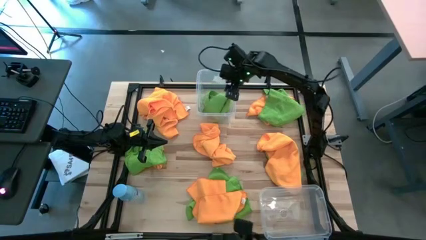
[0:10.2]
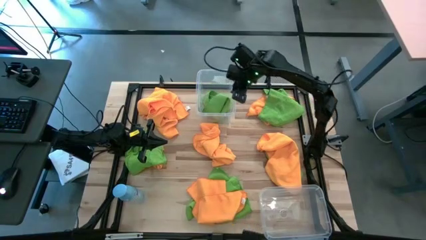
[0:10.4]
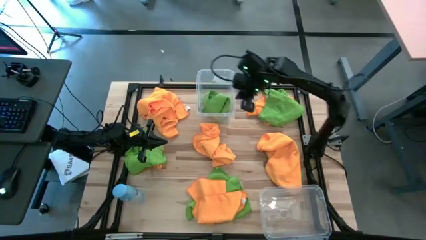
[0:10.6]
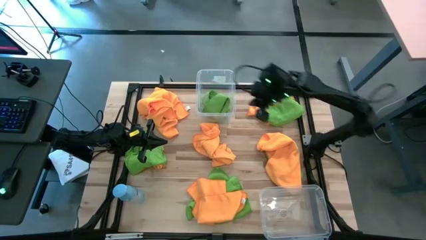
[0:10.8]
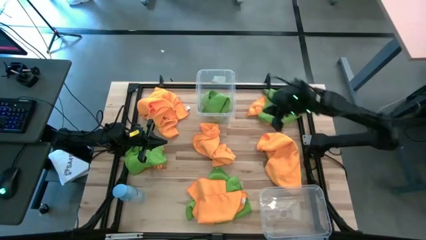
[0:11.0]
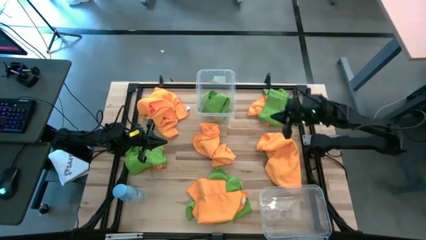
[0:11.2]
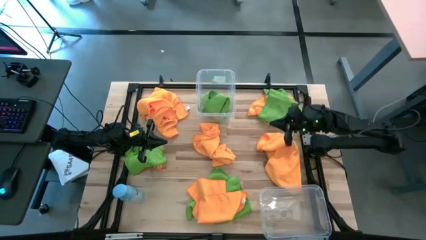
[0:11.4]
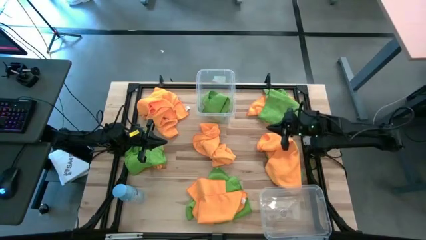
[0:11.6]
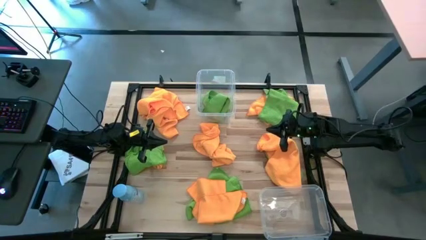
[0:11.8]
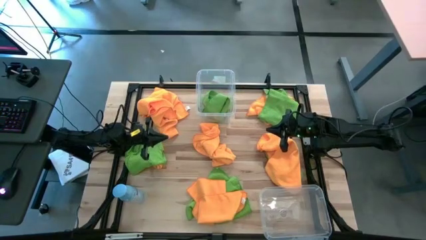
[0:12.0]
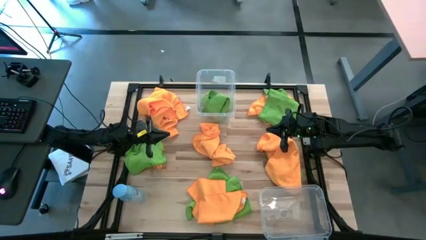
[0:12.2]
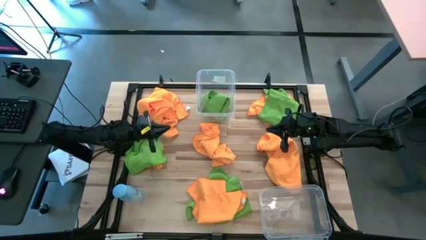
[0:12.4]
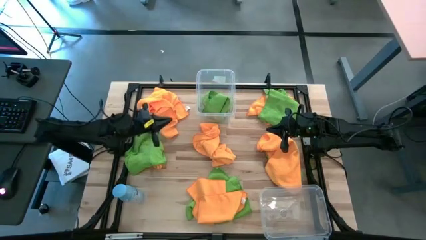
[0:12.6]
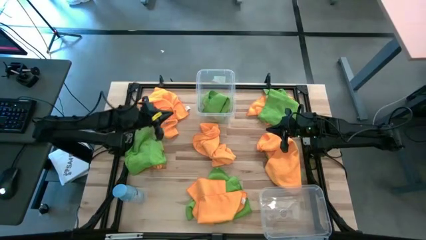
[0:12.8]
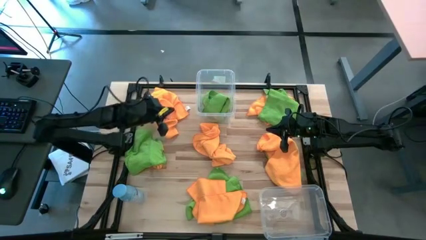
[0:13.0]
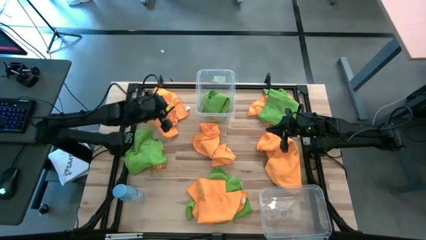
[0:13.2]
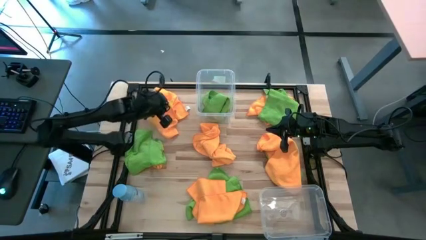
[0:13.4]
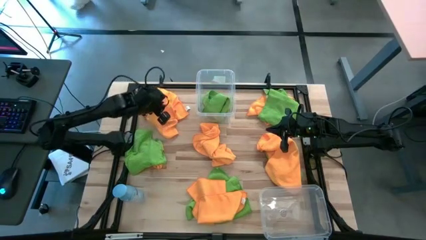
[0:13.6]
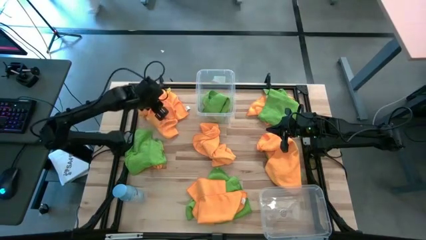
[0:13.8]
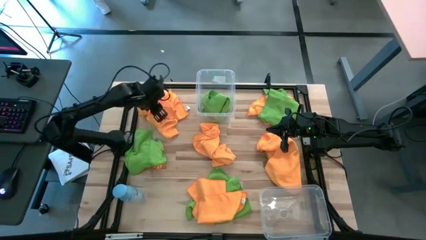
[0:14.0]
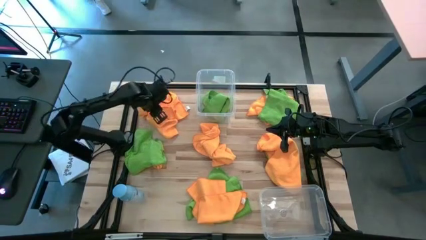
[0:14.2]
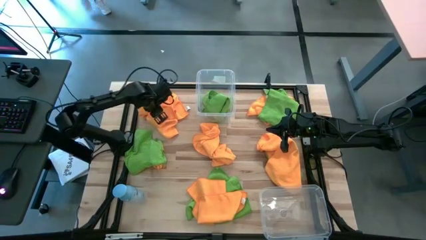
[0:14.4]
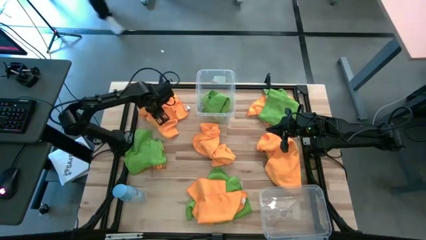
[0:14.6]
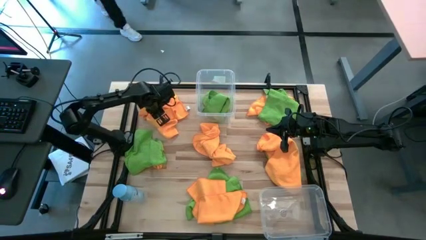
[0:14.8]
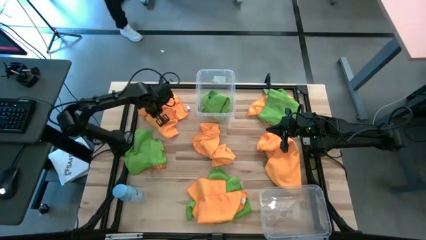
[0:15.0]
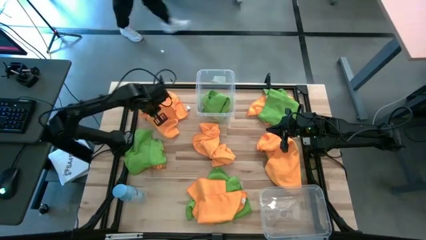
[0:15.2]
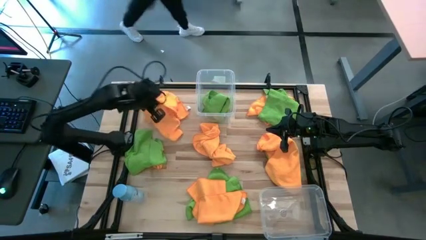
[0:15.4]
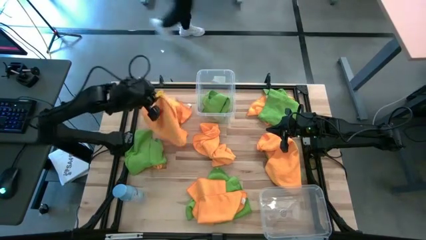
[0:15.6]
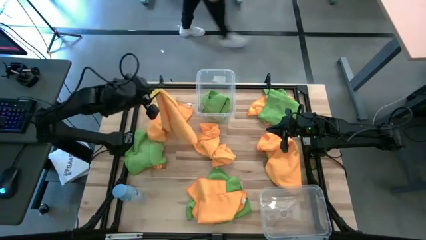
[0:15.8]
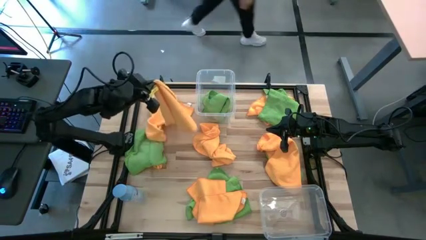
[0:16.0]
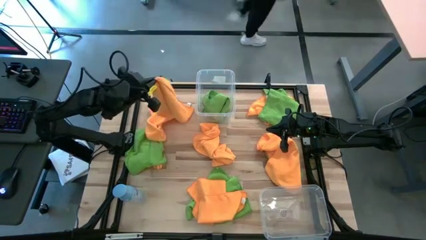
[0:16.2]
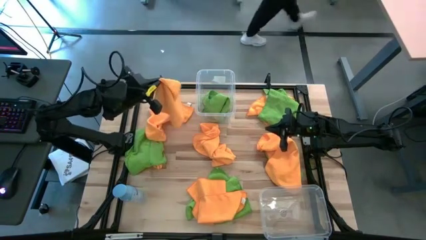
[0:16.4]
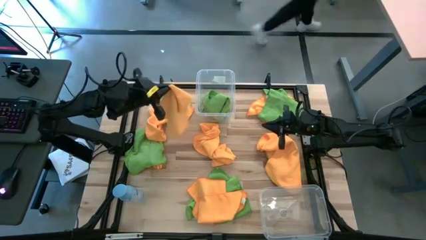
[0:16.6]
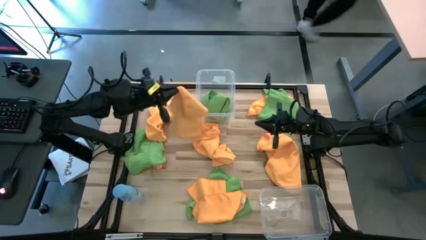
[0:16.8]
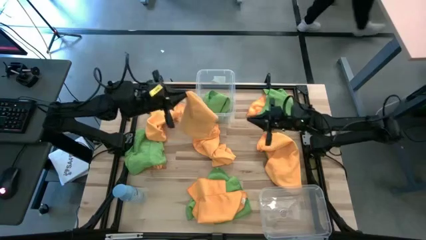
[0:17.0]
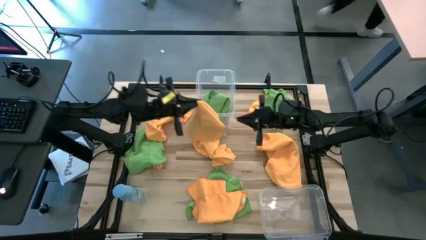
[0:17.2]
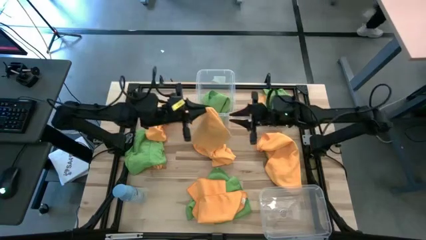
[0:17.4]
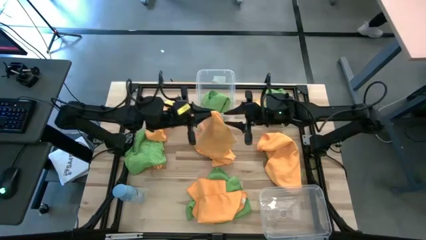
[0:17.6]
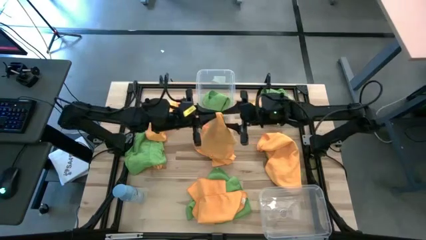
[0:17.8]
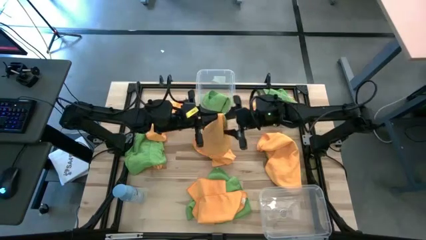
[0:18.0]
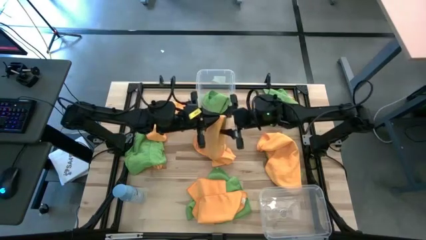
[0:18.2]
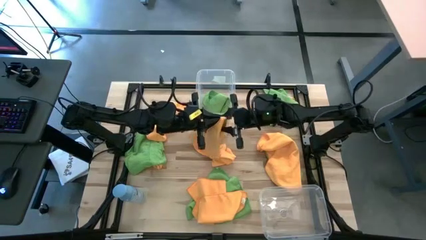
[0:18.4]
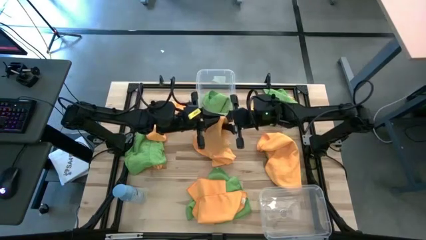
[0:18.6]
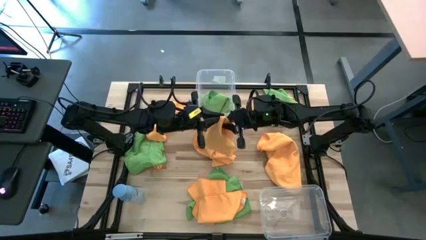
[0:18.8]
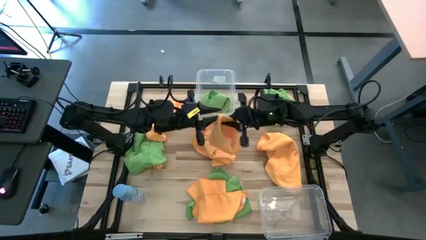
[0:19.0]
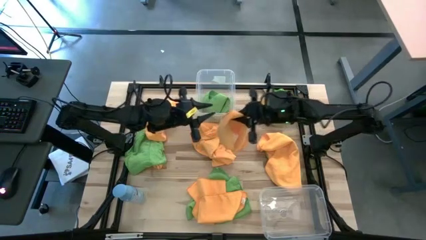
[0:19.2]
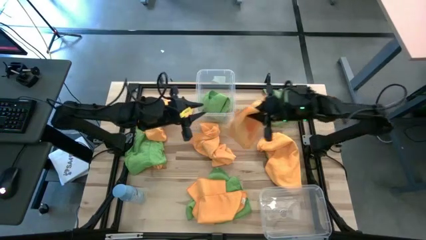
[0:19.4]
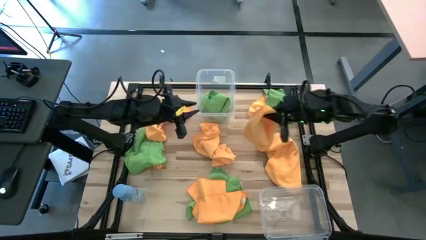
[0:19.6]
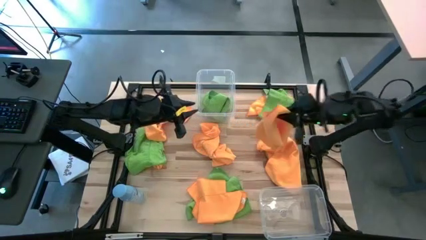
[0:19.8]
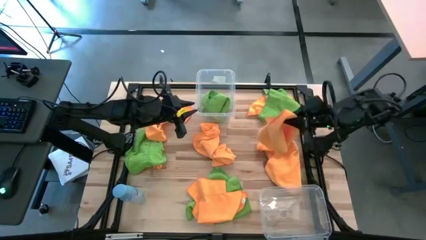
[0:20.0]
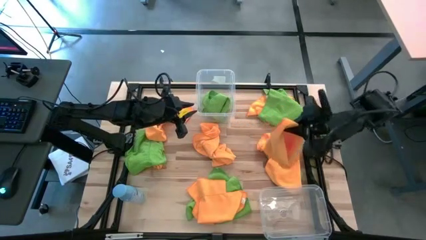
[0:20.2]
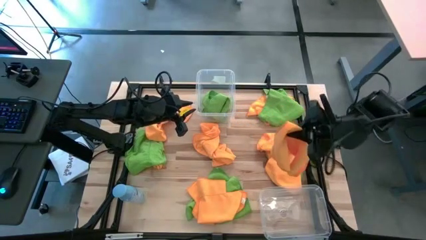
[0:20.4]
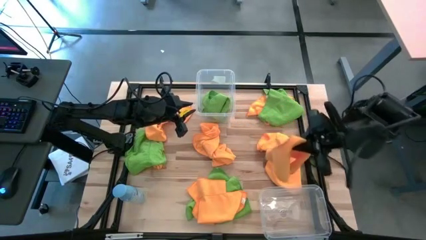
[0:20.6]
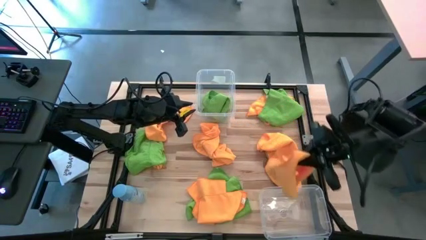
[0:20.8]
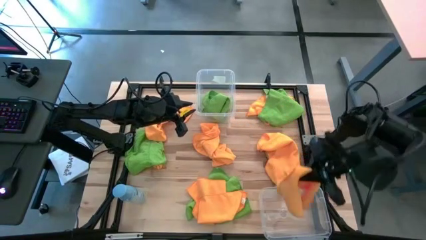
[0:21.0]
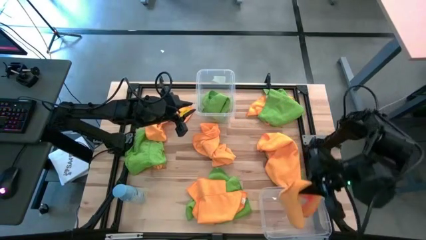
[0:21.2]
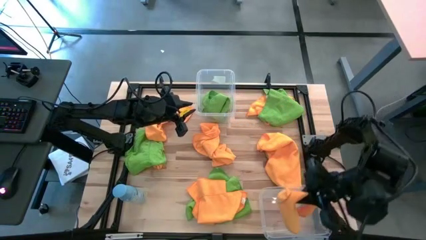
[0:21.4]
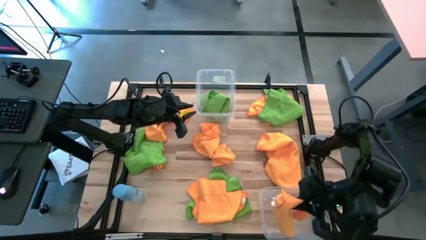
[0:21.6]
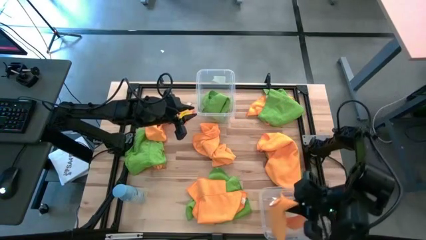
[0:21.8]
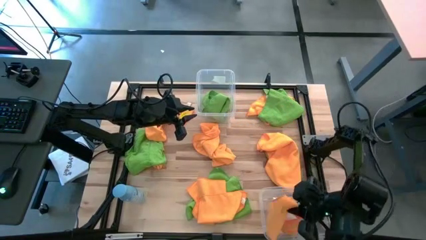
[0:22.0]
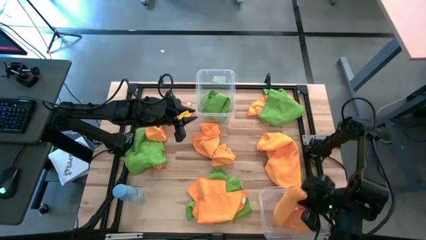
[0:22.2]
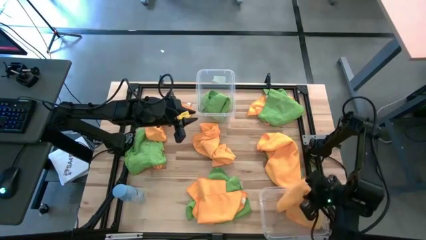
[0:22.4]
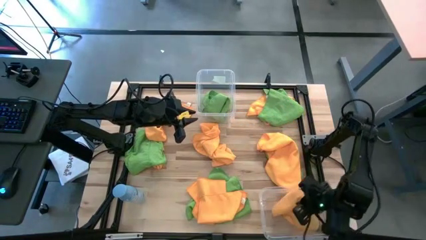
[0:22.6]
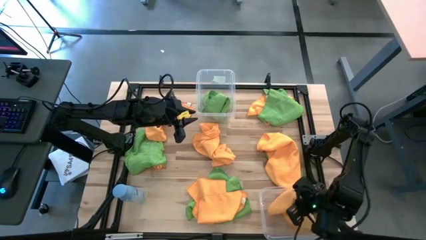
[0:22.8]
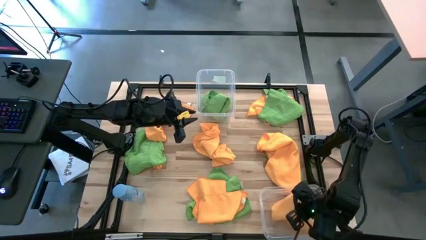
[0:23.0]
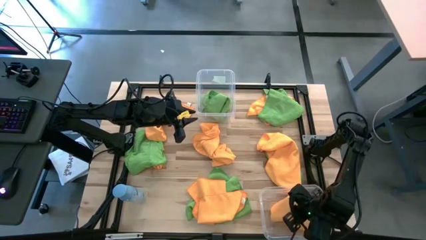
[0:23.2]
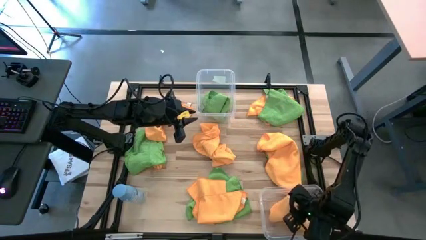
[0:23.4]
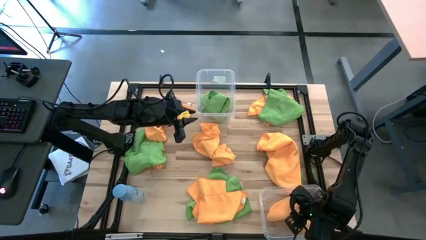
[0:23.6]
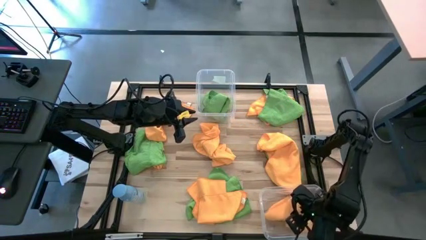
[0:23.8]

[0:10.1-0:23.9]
Task: Sort microfiber towel by color & place in baskets
Put the orange microfiber towel into the bottom transparent bin
